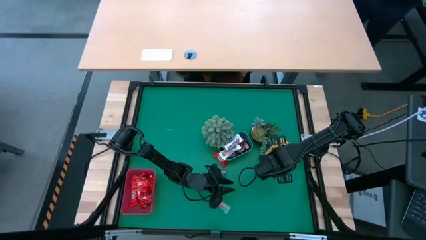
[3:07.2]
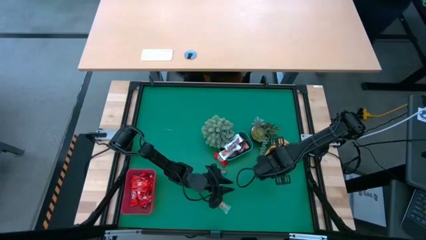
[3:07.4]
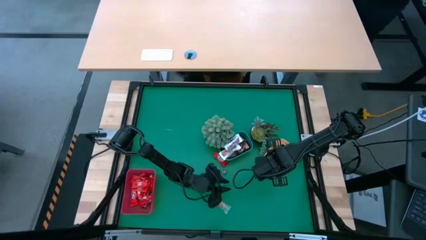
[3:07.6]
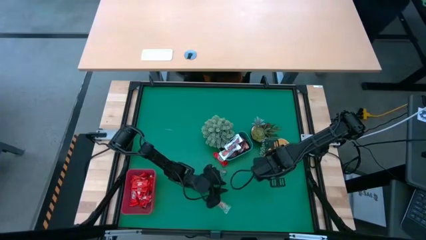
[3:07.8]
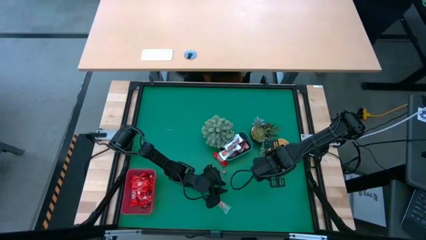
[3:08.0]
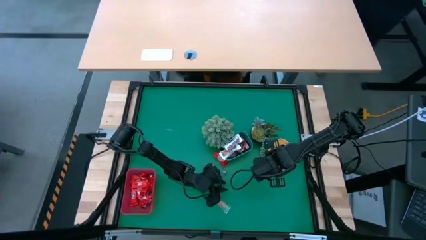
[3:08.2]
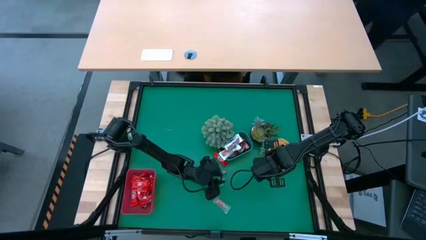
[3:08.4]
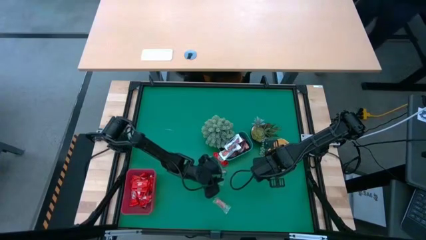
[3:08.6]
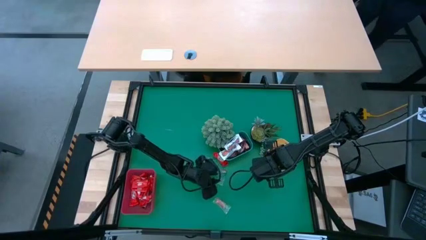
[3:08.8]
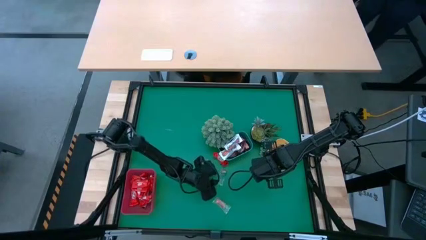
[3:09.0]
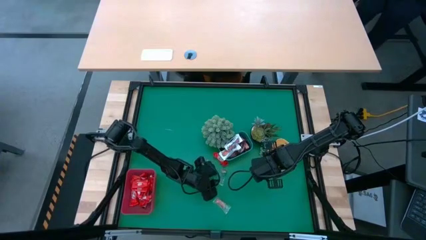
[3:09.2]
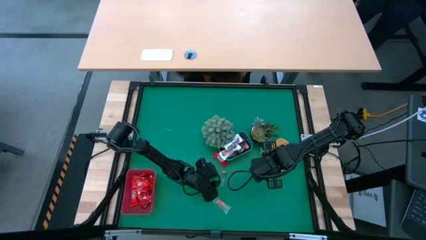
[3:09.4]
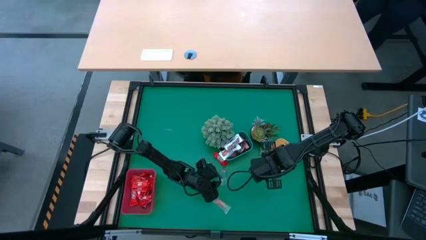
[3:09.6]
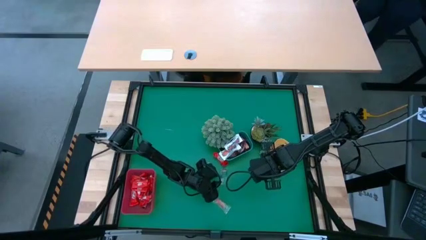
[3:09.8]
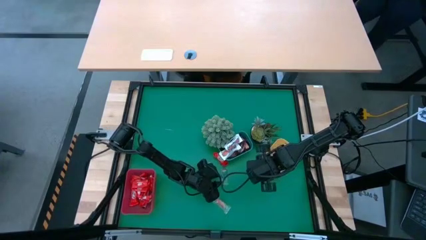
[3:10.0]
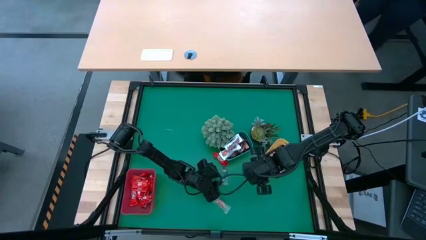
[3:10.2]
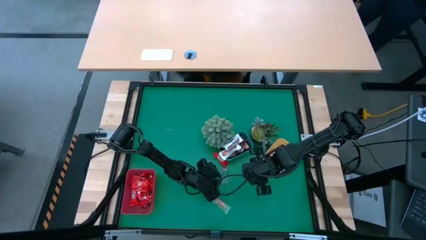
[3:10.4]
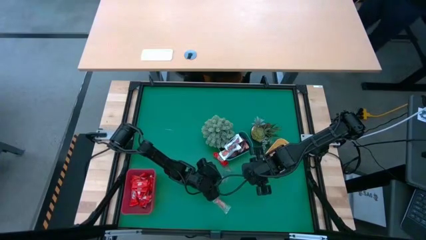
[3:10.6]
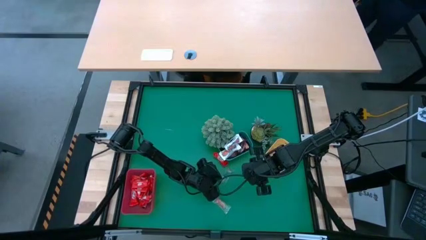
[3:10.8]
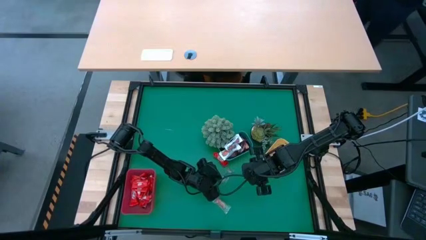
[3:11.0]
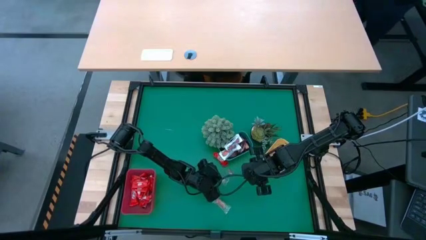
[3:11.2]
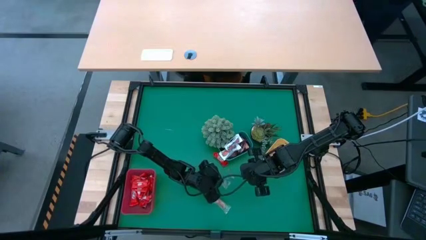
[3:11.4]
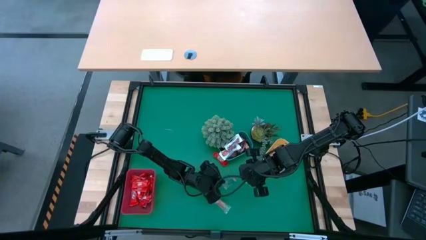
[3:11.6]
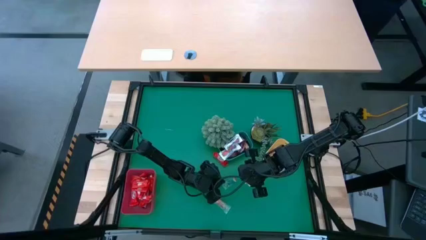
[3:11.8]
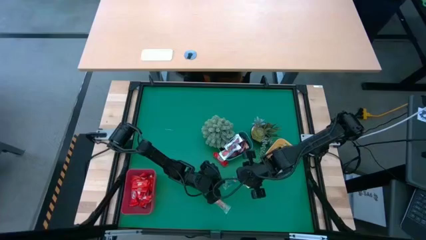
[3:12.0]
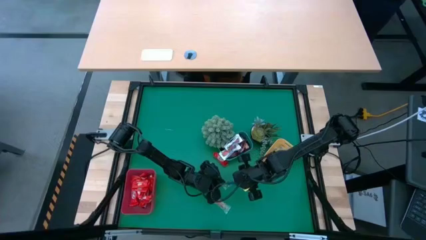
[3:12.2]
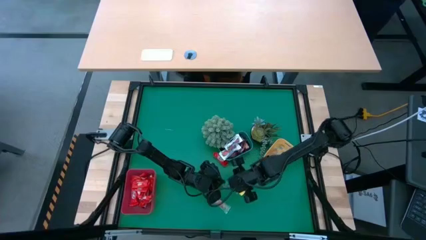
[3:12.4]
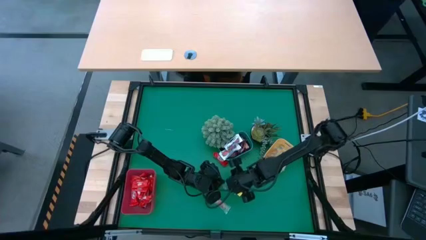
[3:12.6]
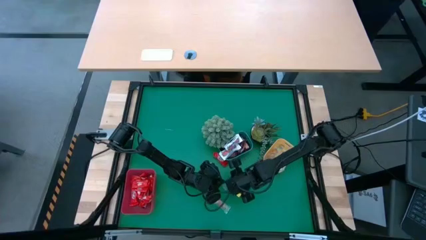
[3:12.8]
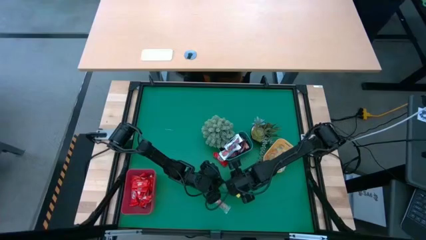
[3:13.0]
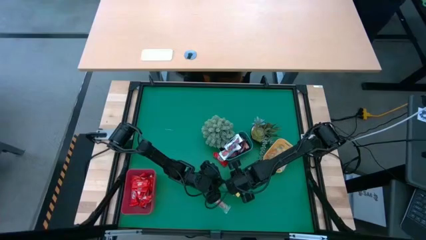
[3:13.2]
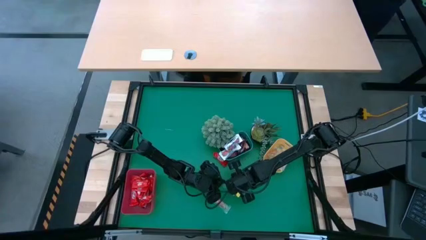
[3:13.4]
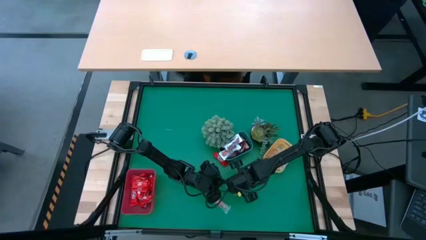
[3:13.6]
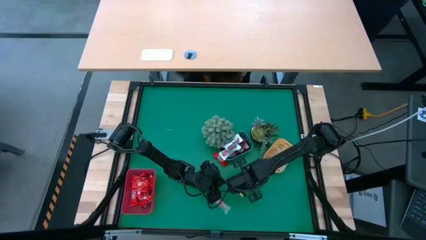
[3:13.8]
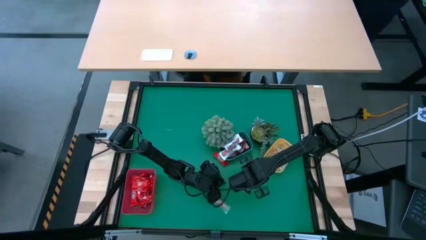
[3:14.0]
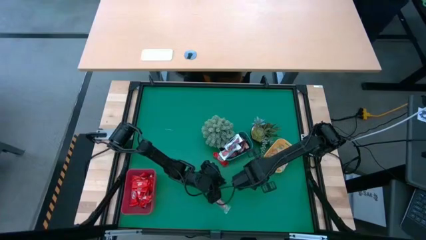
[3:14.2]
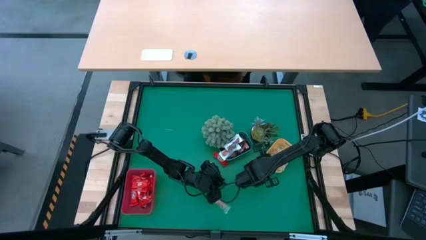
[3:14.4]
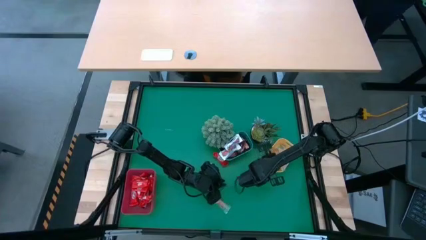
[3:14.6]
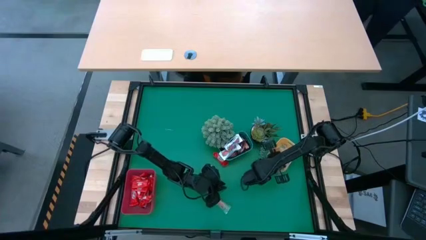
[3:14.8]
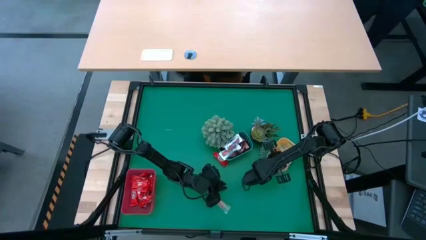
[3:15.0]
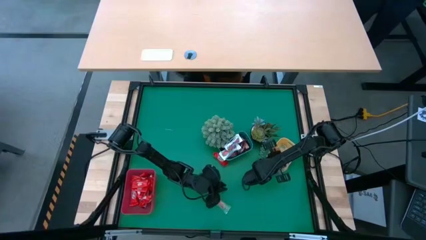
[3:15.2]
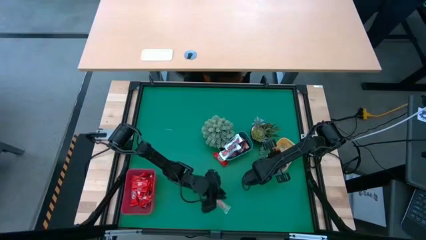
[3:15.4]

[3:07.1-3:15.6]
Task: Organize candy in baskets
Put the blue gummy into the yellow bin

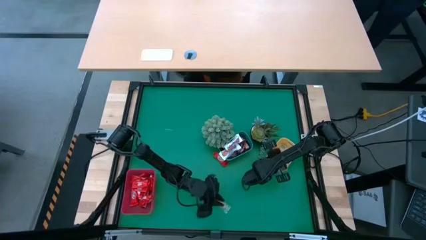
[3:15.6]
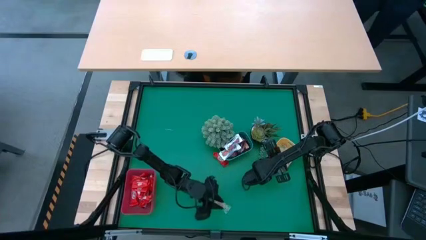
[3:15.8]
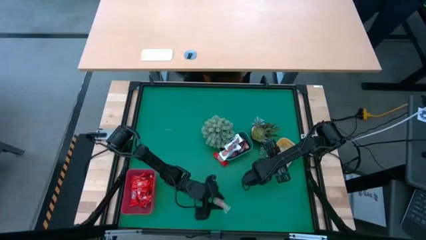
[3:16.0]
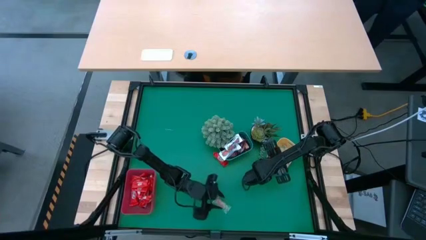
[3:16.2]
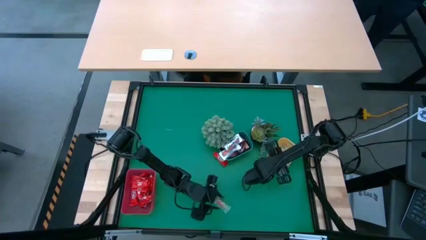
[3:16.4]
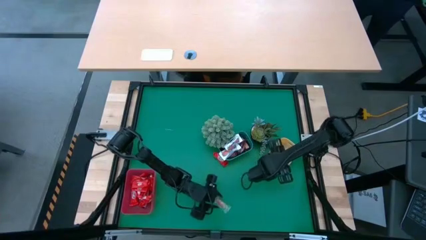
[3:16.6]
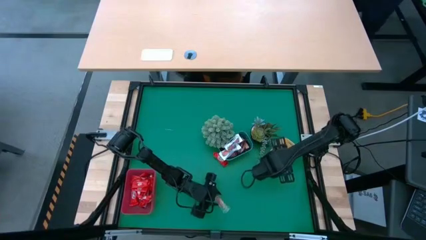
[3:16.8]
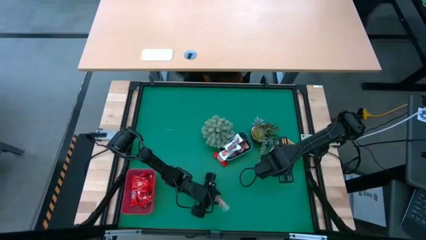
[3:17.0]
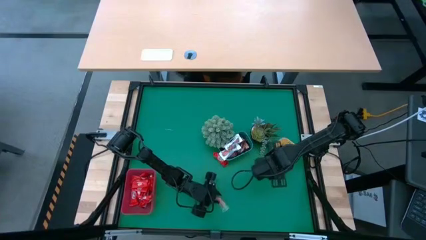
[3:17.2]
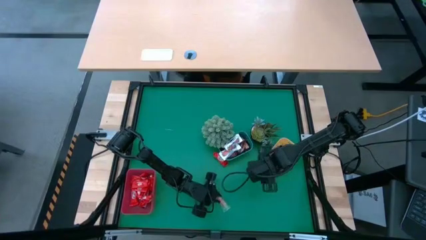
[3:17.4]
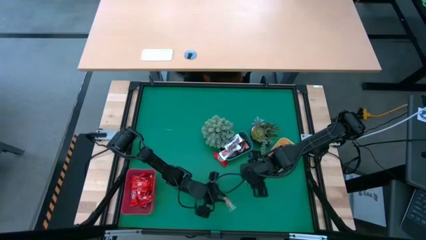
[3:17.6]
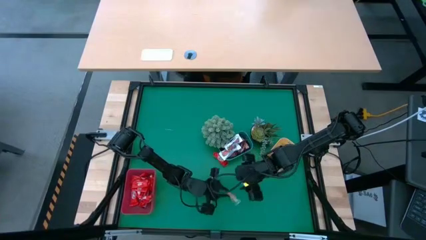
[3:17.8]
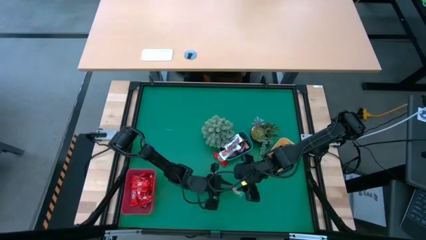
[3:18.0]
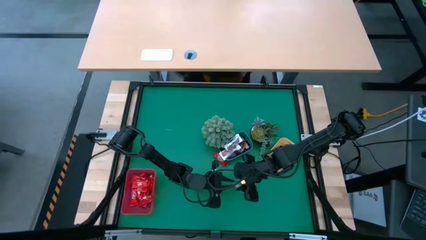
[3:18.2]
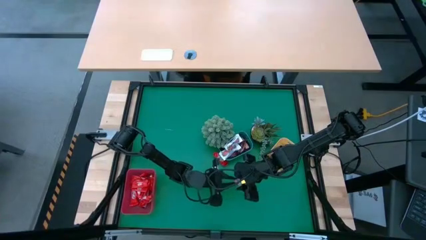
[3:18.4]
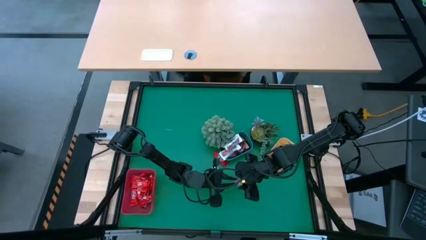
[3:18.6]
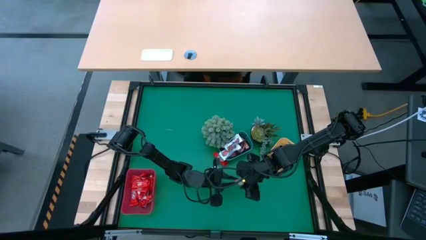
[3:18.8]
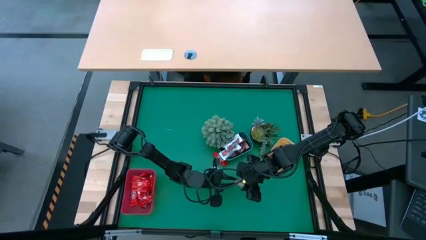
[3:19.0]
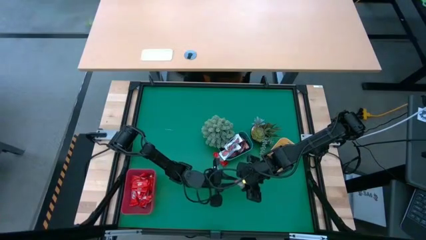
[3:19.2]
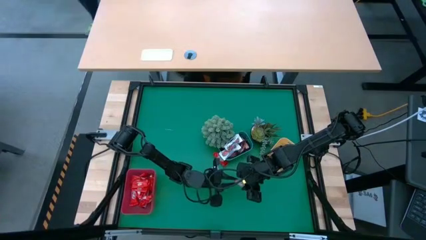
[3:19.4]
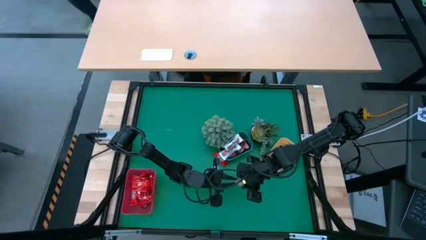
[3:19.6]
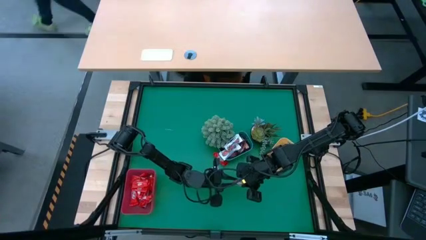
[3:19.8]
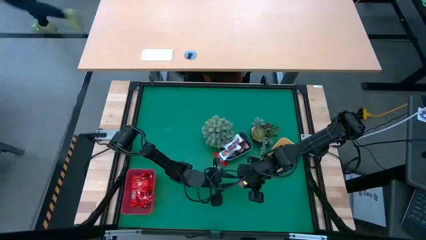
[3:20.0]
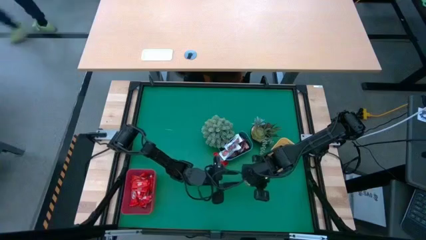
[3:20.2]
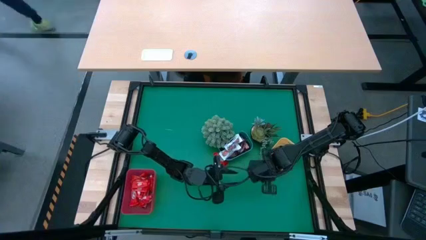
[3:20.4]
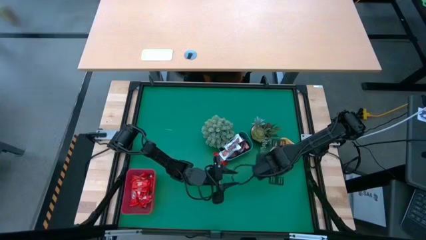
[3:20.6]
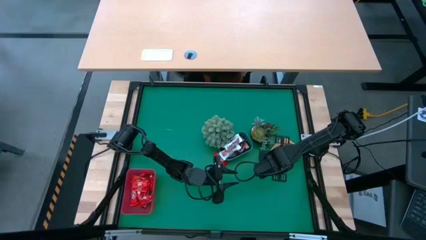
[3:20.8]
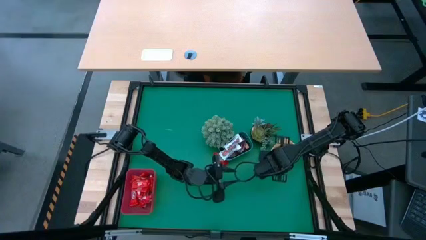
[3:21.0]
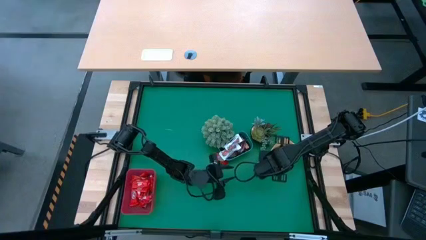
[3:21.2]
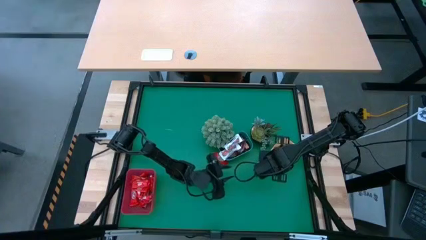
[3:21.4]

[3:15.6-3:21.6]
Put the orange gummy into the yellow bin

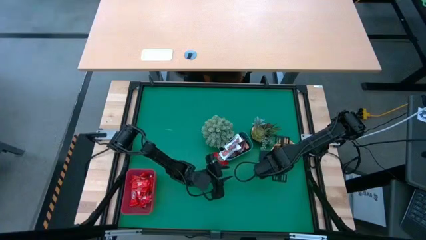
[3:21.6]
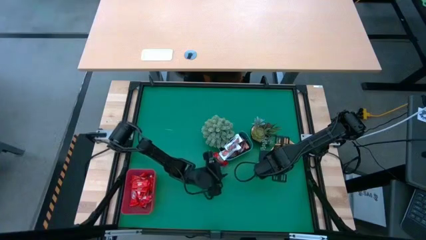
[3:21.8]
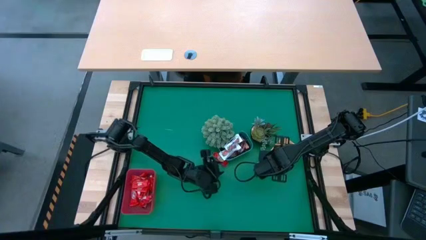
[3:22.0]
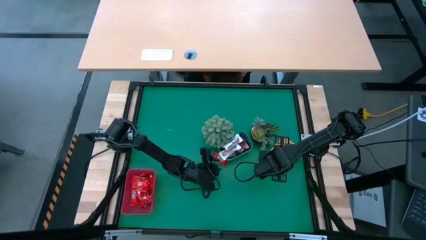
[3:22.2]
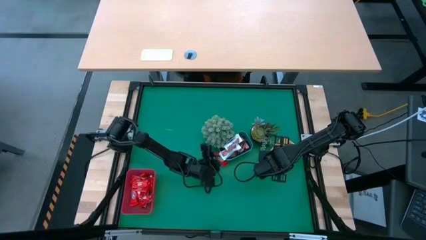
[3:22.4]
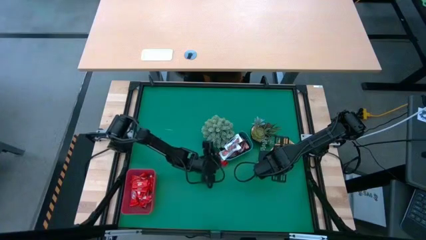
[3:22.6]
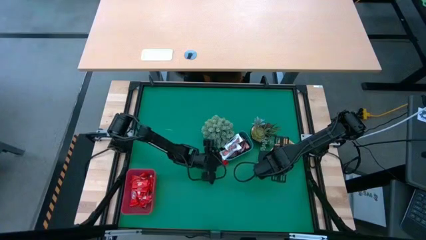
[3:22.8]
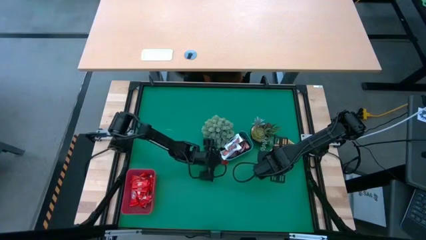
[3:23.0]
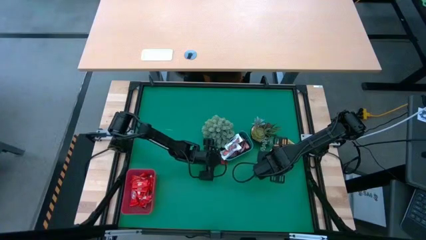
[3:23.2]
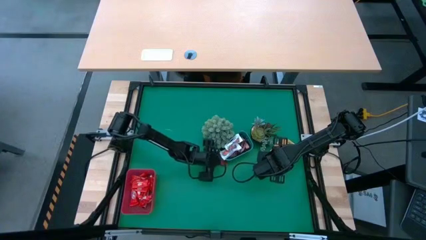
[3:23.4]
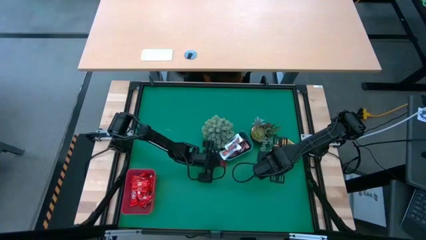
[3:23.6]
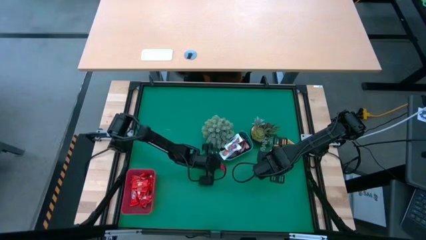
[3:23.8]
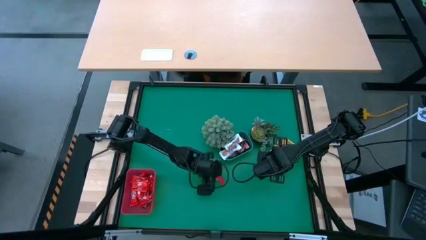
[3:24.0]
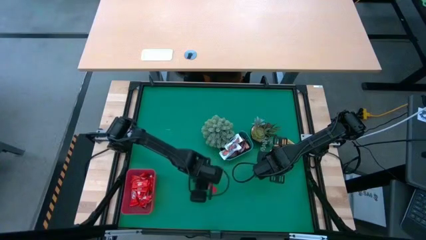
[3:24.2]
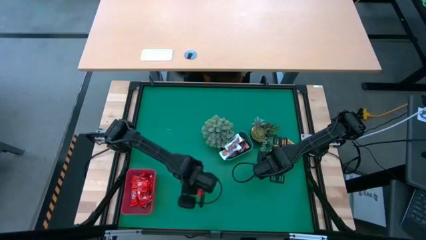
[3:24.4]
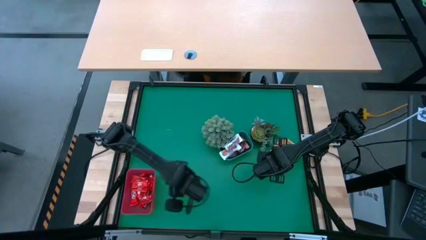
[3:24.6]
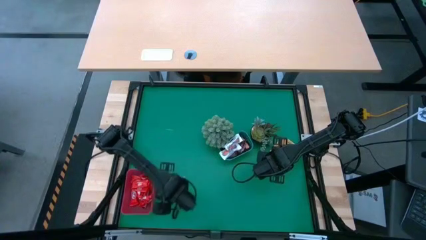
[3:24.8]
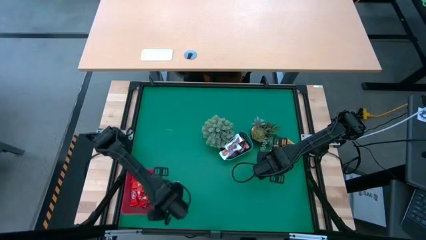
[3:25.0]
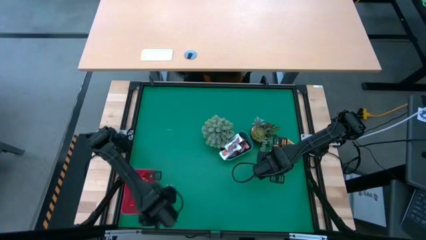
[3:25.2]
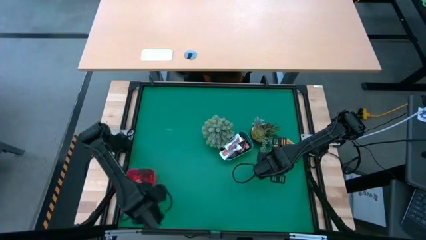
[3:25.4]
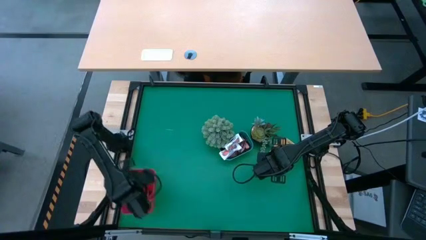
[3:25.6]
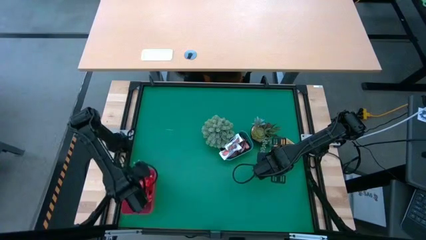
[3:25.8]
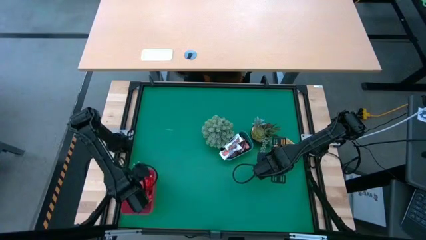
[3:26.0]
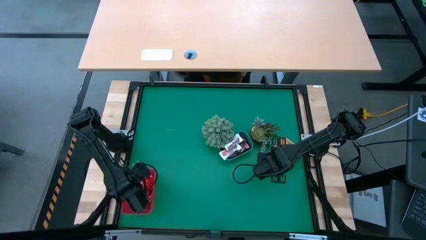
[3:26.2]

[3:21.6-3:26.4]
Put the red chocolate into the red bin
